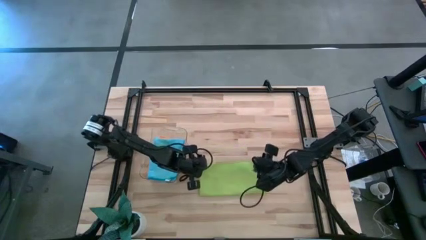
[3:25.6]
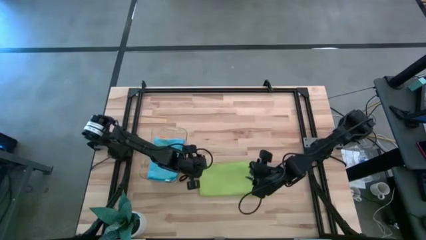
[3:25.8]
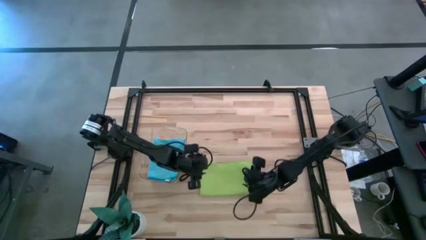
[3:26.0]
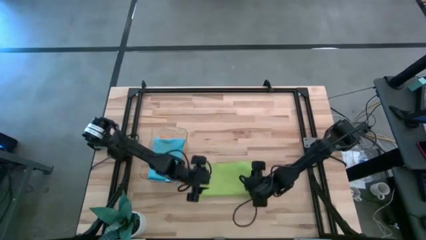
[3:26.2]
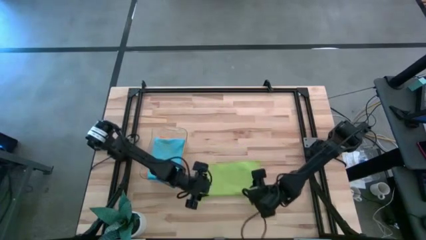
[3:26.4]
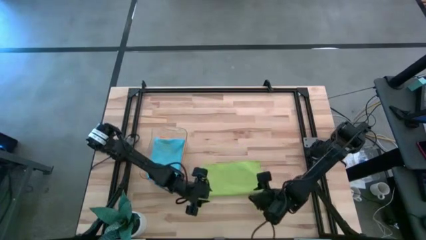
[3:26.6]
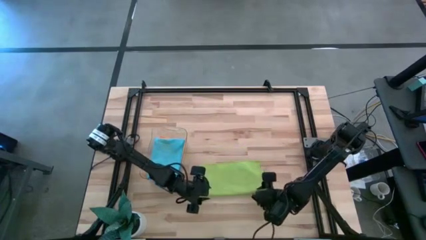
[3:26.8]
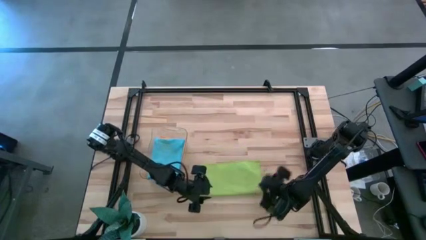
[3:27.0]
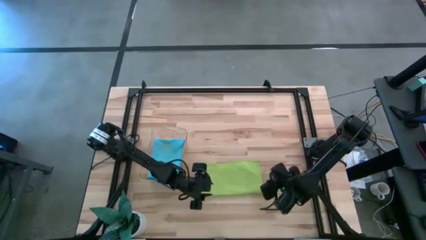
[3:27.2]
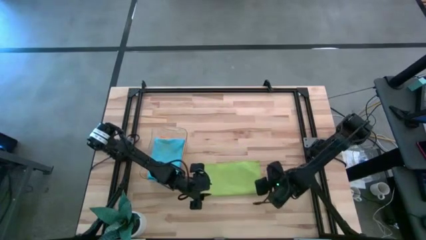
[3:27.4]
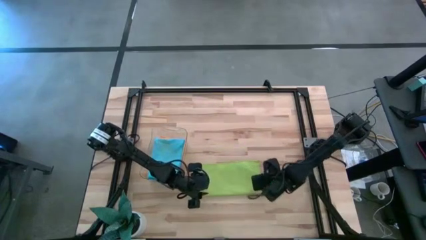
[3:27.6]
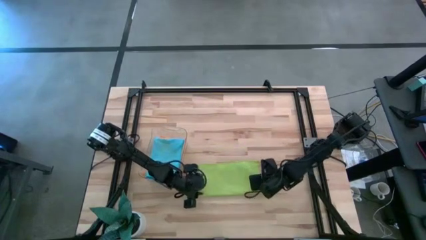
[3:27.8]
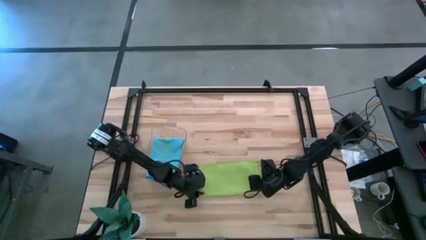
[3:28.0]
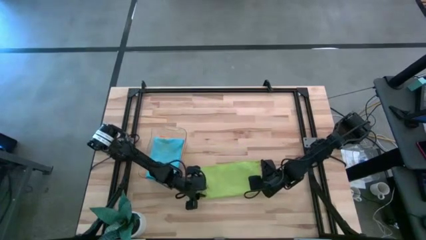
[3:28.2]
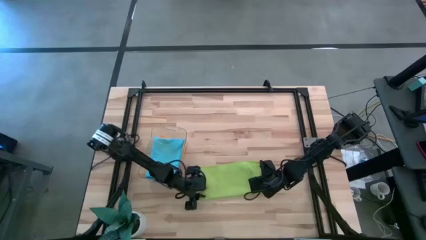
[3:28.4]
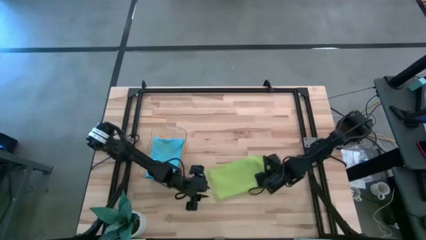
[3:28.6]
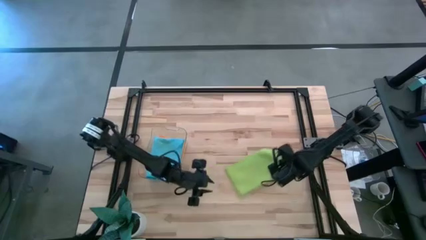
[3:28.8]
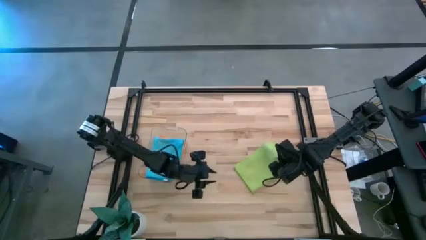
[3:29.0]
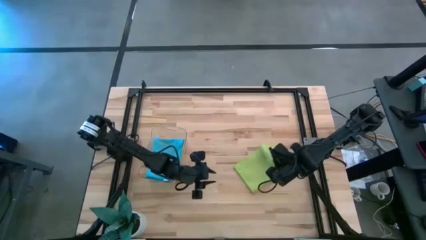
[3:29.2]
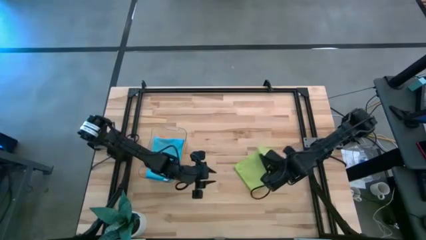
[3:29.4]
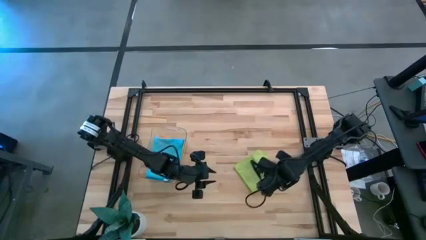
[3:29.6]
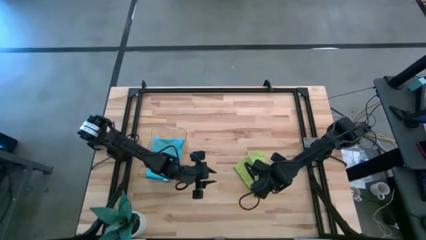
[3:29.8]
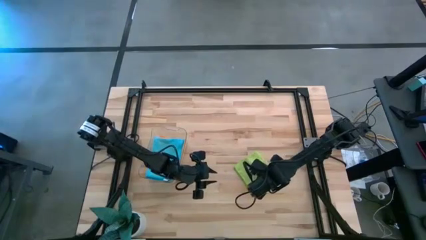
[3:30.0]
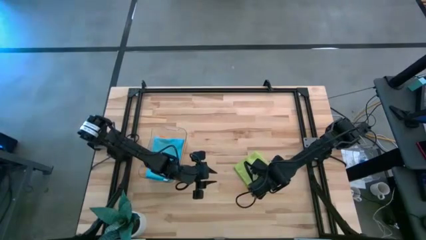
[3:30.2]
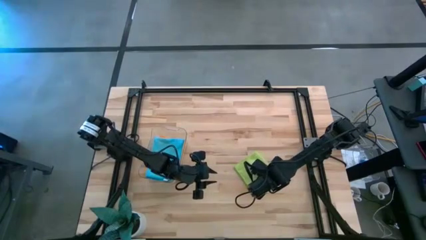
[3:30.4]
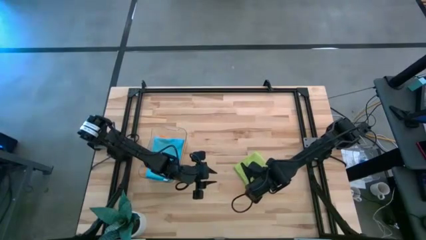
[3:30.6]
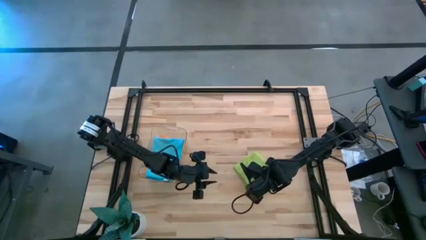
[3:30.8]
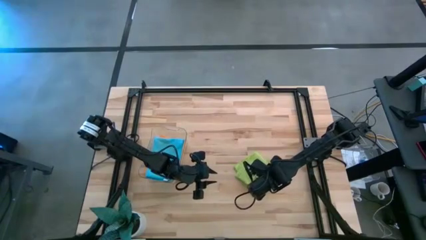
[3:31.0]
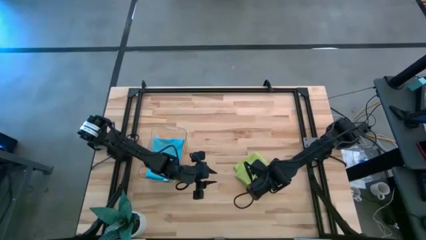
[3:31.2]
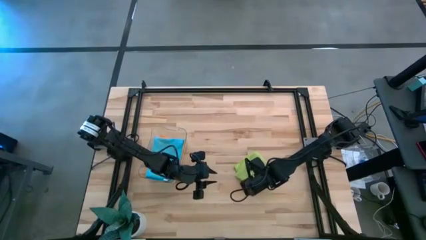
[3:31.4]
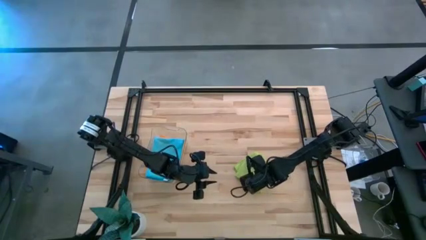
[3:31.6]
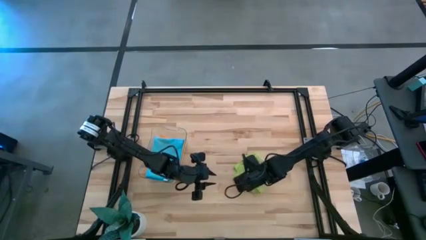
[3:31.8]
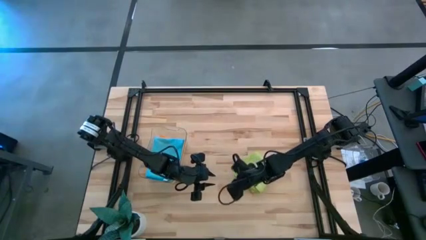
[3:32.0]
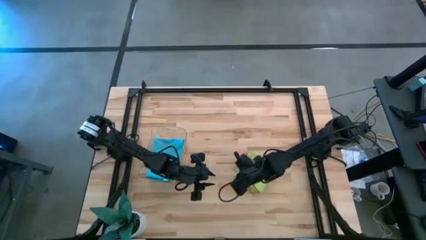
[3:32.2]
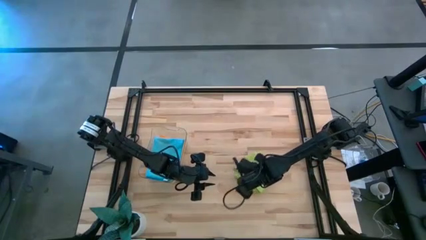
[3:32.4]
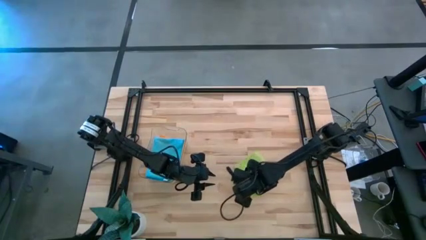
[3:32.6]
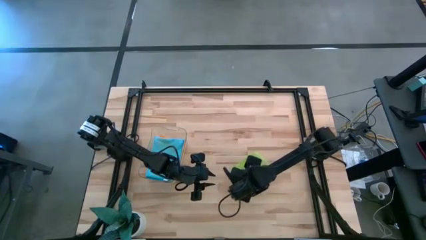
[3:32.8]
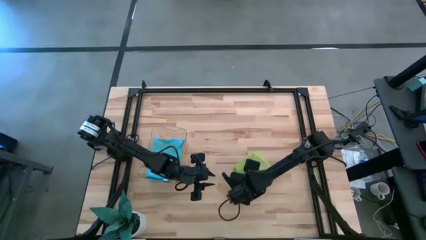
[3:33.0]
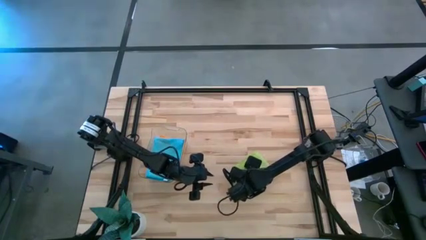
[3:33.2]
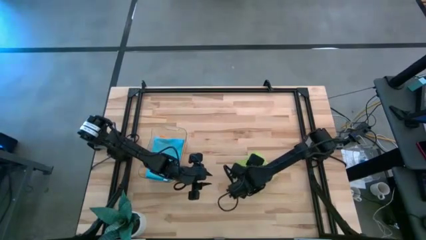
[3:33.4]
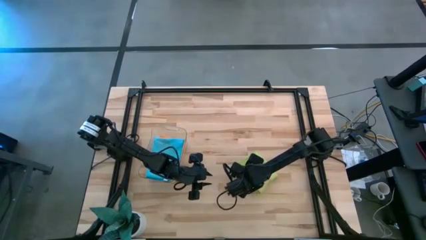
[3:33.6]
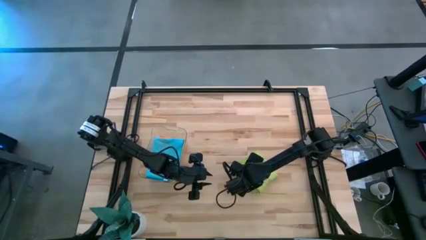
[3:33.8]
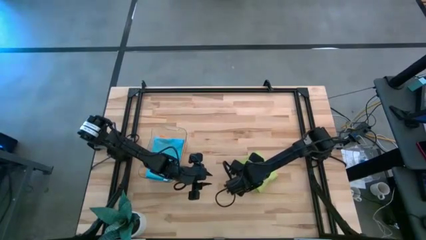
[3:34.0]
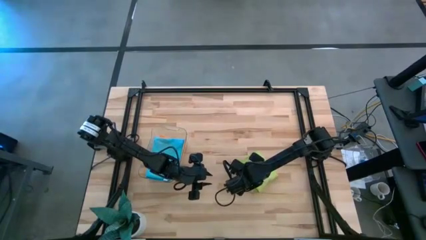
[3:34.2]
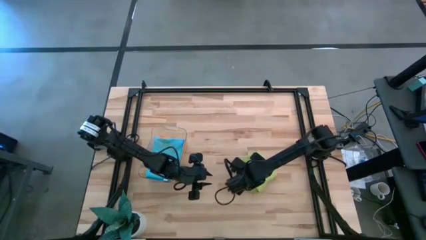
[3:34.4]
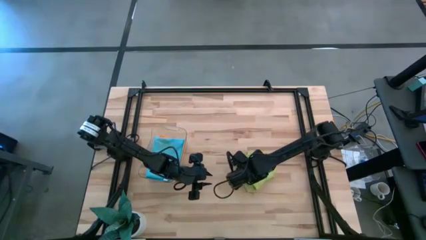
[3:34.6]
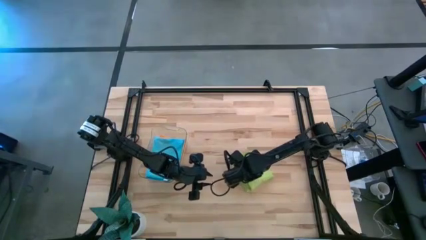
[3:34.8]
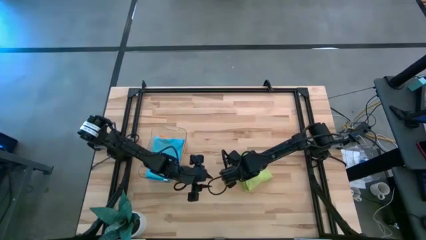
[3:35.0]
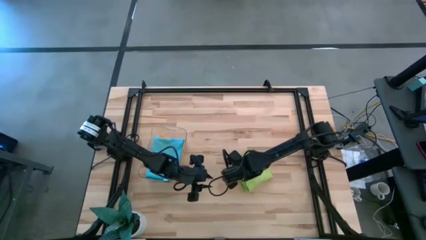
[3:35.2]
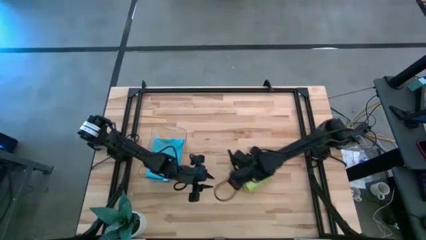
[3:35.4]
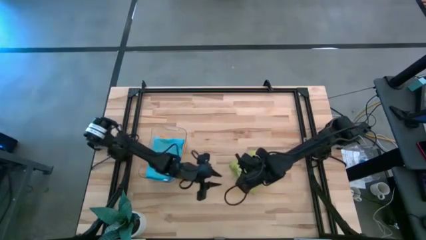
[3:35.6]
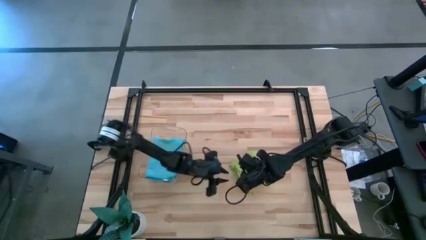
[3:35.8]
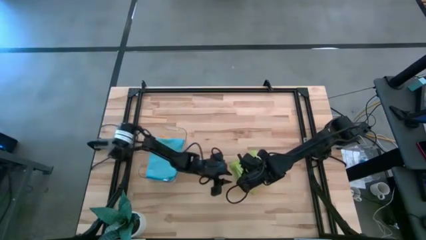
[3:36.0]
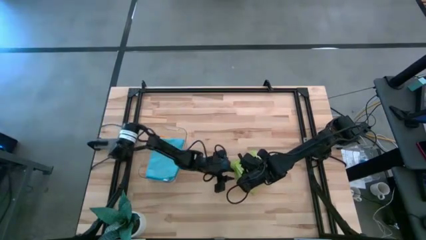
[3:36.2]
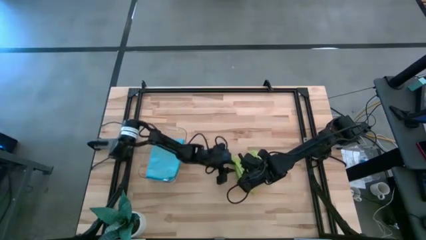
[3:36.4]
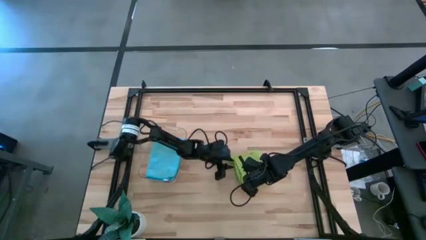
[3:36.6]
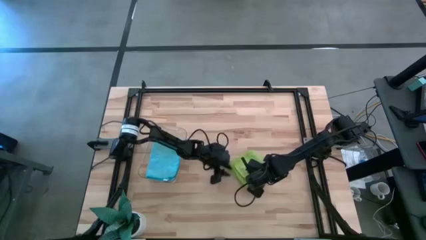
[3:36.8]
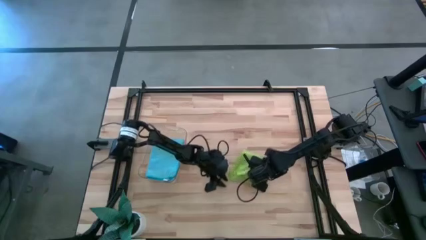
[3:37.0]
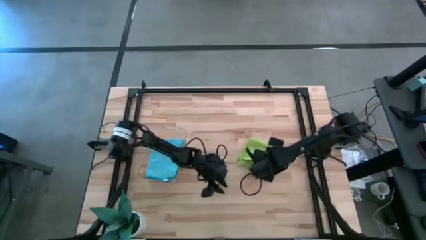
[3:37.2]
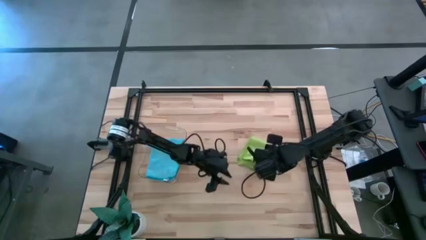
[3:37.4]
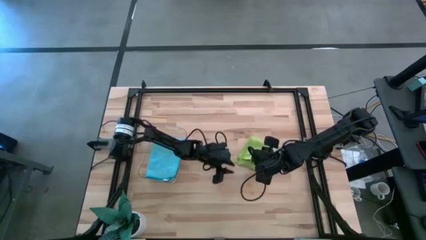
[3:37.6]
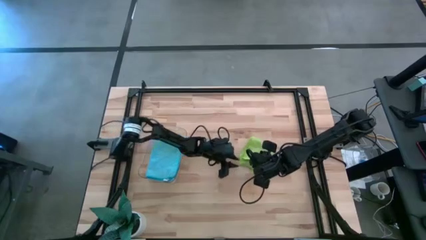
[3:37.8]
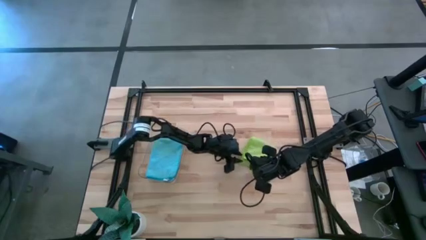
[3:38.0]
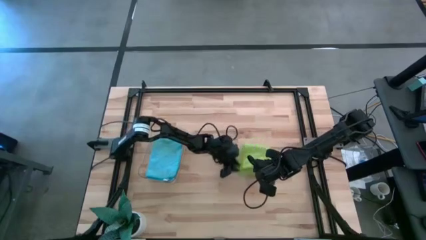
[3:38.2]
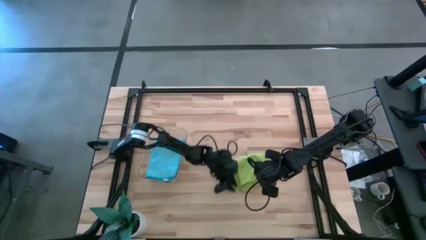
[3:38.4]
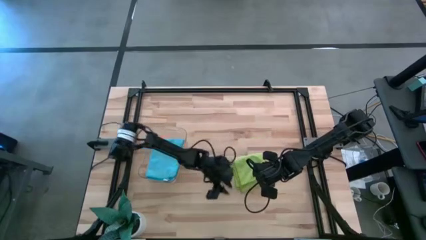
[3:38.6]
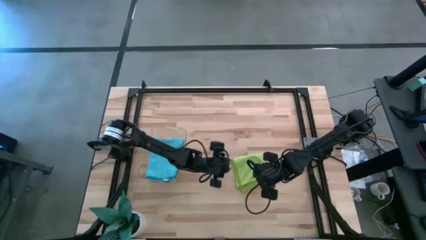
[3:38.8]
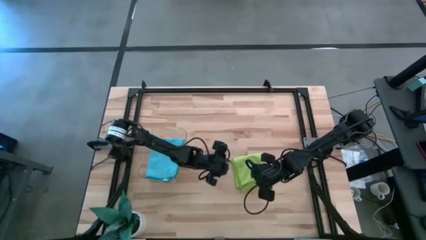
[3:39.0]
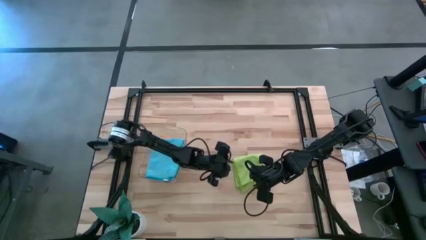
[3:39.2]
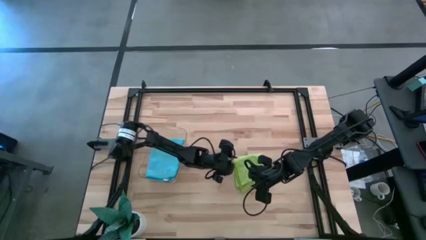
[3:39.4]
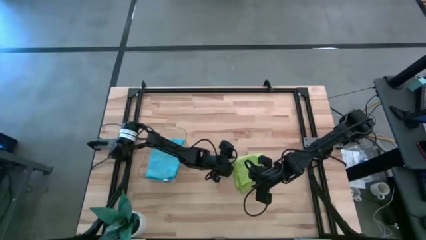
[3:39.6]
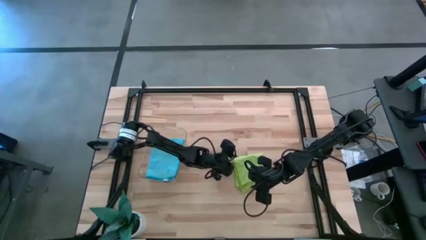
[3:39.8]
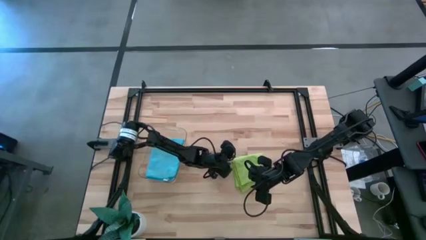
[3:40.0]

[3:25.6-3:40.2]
Task: Fold microfiber towels
Fold the green microfiber towel on the table
